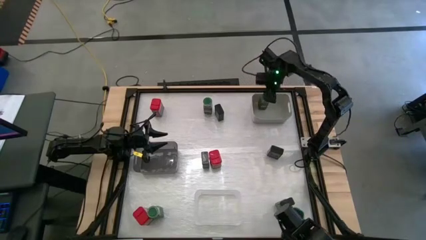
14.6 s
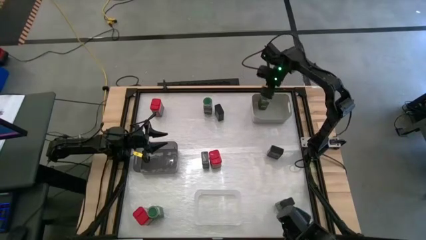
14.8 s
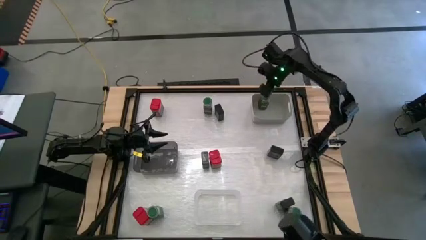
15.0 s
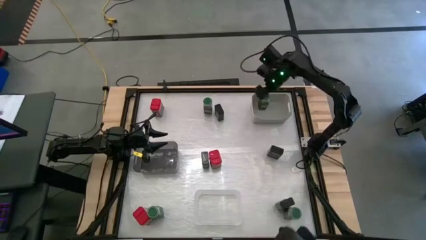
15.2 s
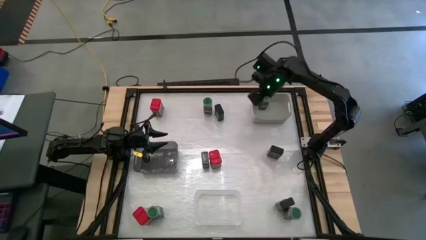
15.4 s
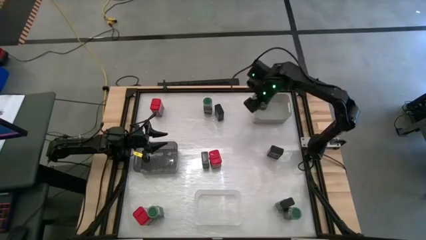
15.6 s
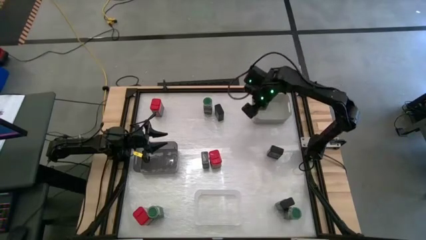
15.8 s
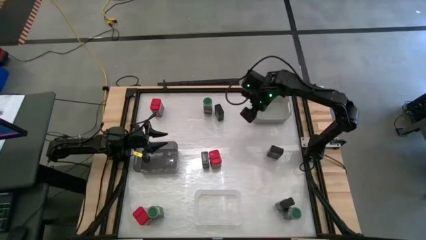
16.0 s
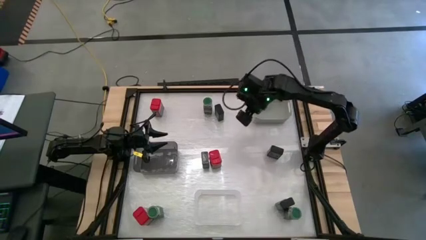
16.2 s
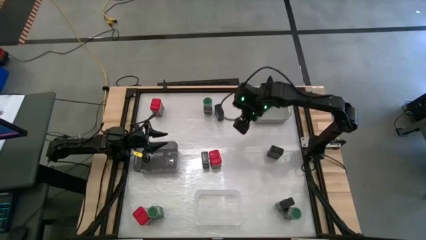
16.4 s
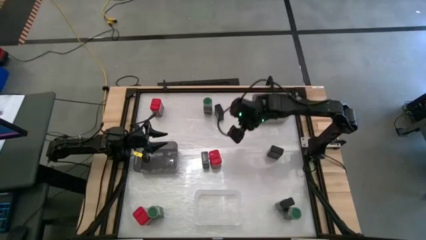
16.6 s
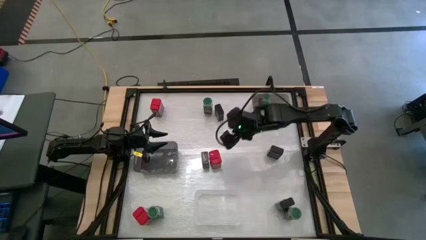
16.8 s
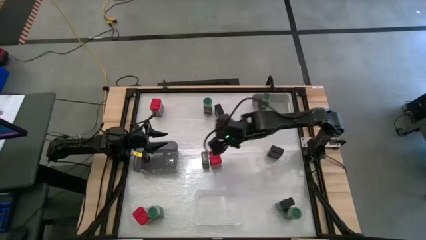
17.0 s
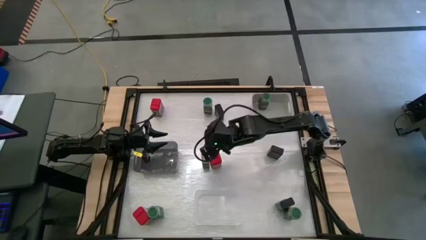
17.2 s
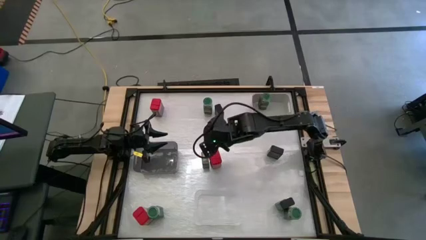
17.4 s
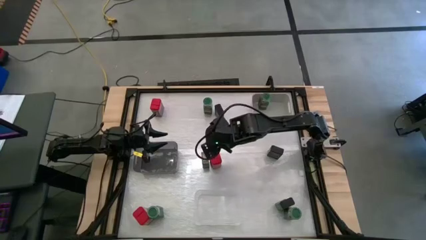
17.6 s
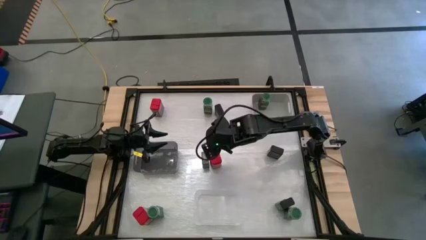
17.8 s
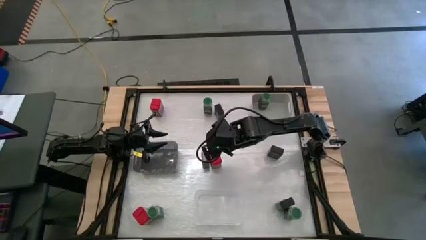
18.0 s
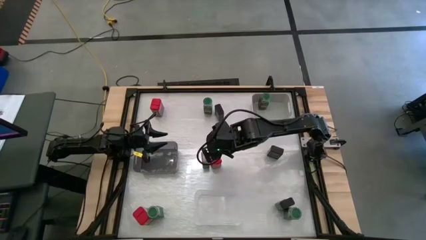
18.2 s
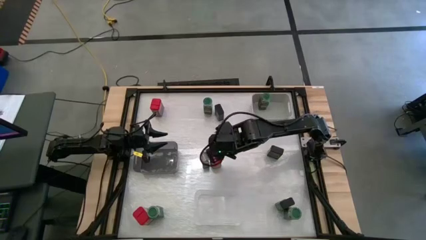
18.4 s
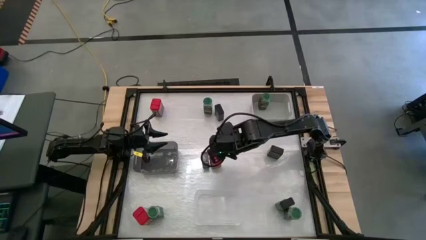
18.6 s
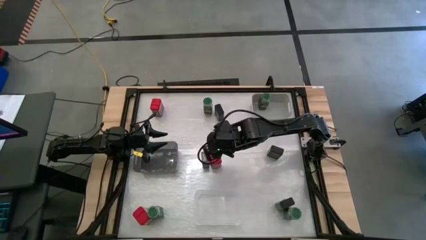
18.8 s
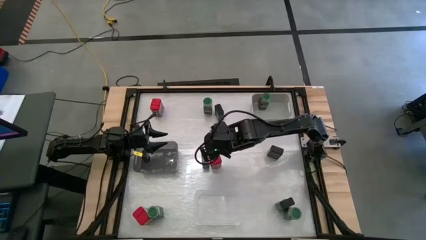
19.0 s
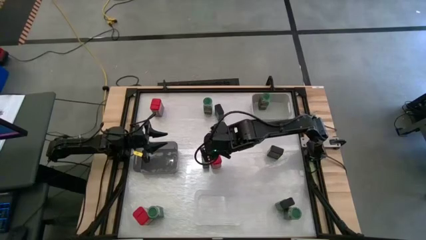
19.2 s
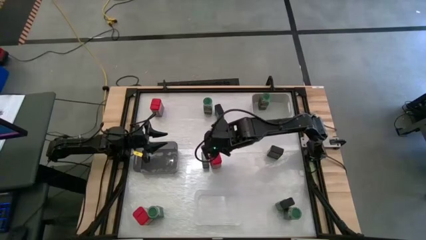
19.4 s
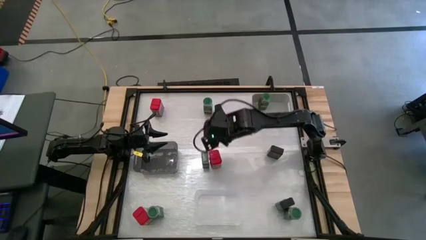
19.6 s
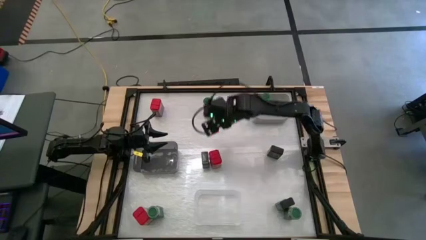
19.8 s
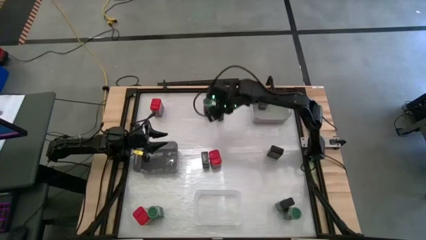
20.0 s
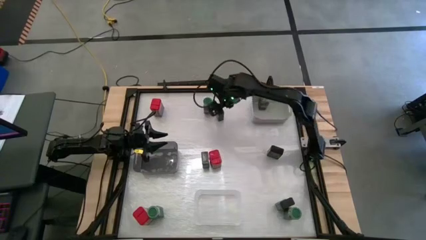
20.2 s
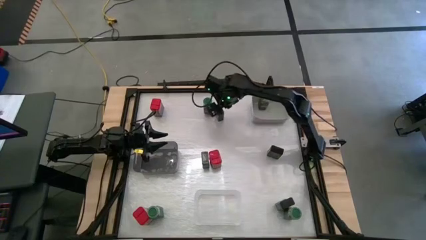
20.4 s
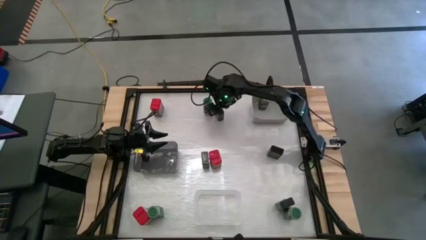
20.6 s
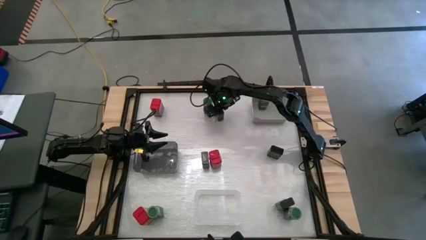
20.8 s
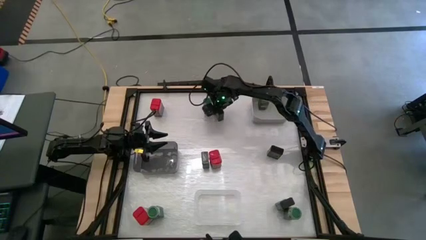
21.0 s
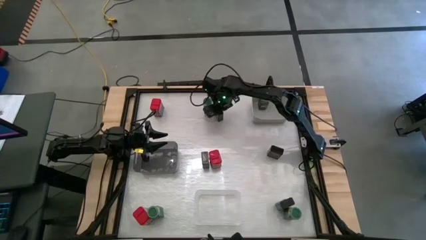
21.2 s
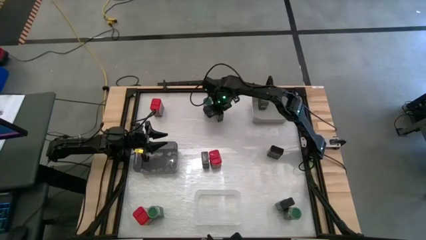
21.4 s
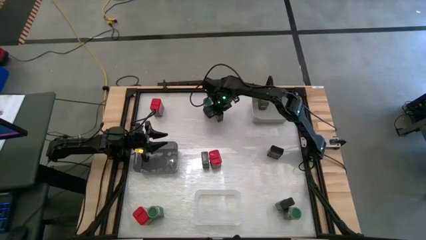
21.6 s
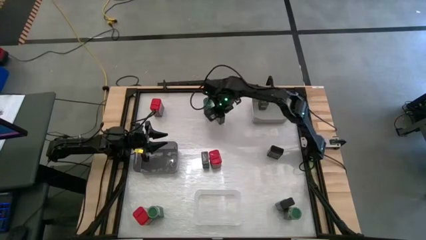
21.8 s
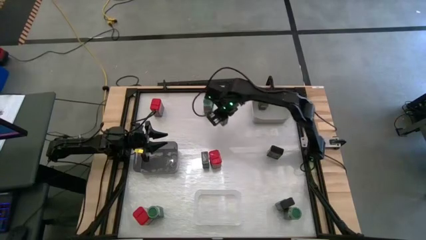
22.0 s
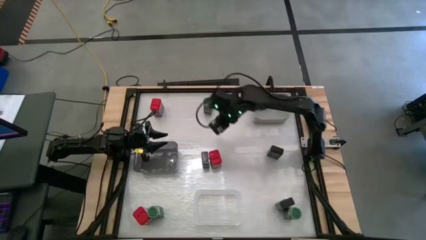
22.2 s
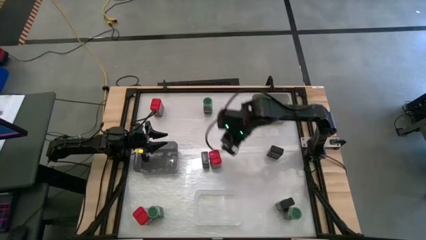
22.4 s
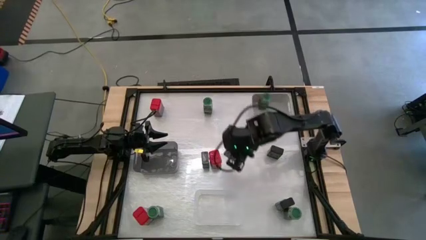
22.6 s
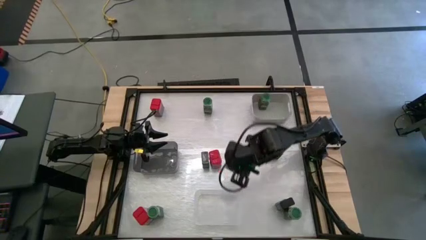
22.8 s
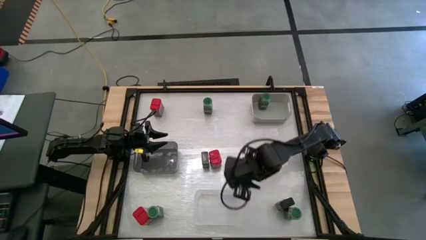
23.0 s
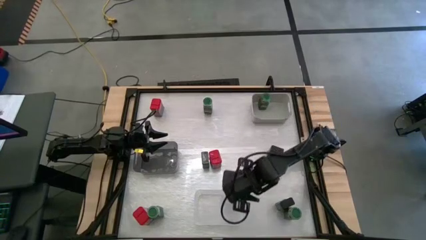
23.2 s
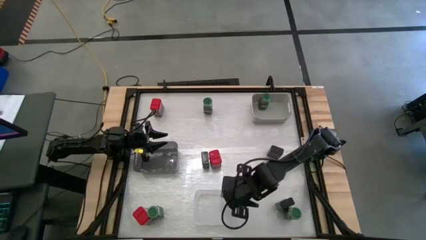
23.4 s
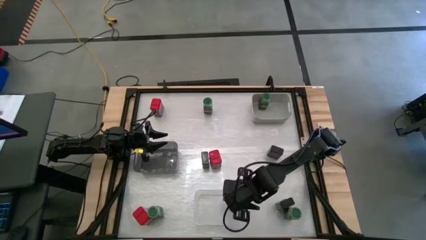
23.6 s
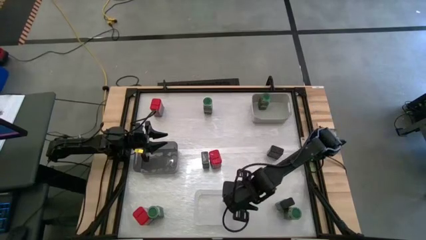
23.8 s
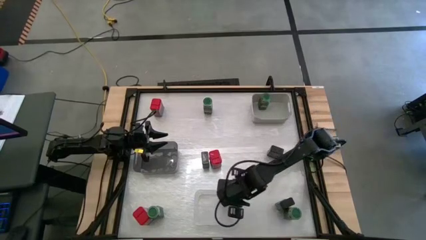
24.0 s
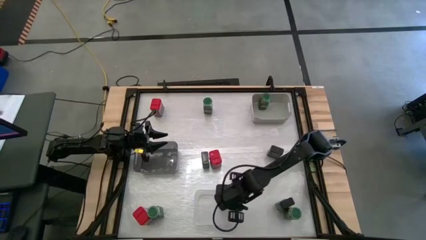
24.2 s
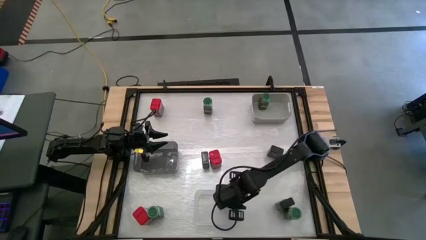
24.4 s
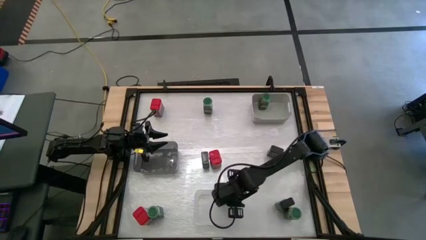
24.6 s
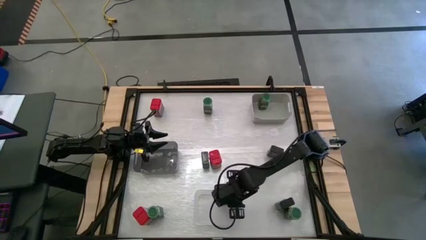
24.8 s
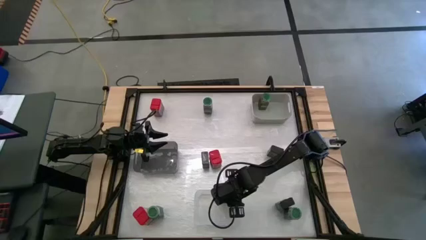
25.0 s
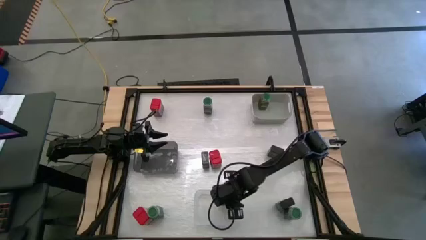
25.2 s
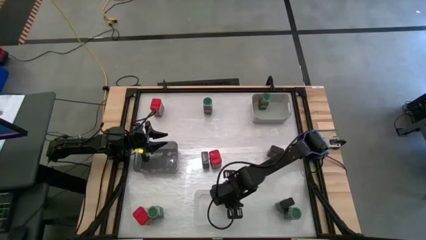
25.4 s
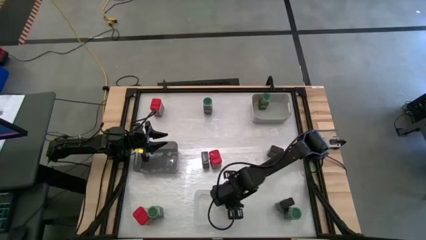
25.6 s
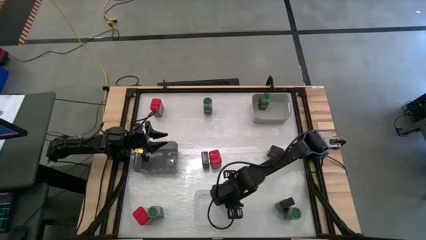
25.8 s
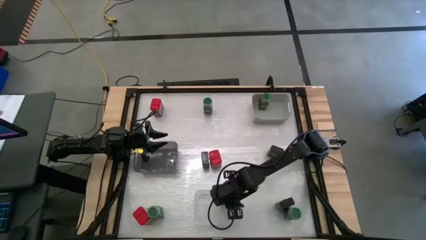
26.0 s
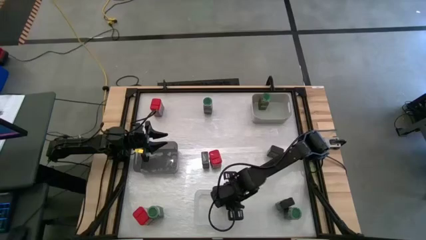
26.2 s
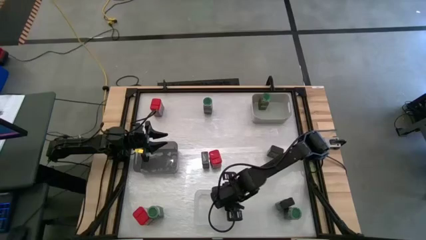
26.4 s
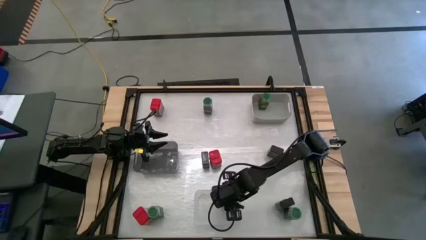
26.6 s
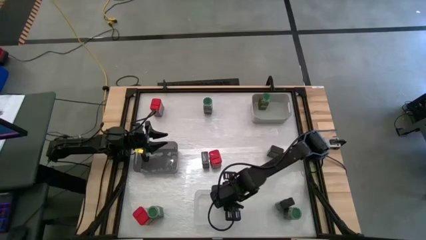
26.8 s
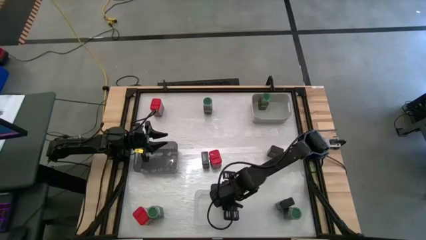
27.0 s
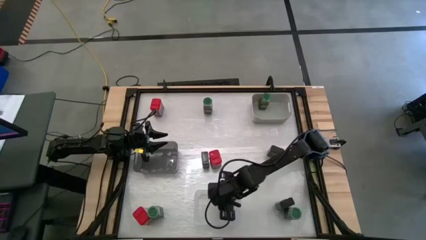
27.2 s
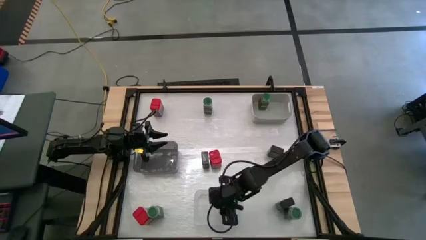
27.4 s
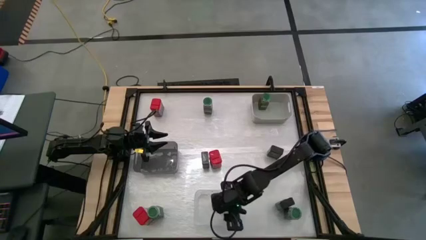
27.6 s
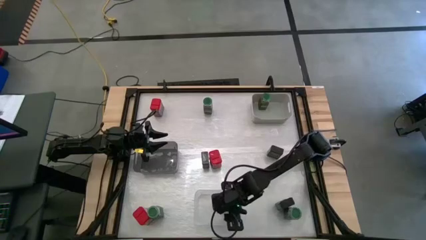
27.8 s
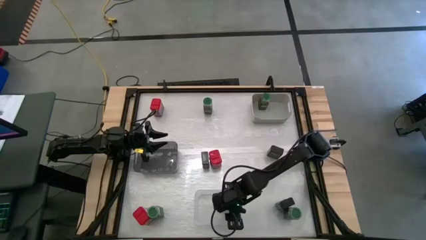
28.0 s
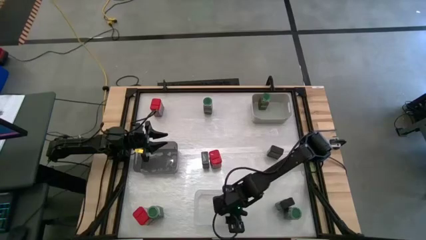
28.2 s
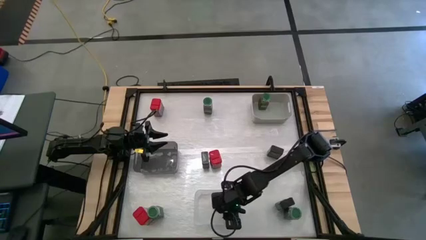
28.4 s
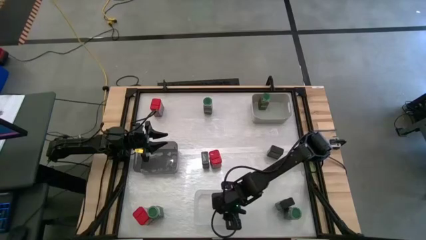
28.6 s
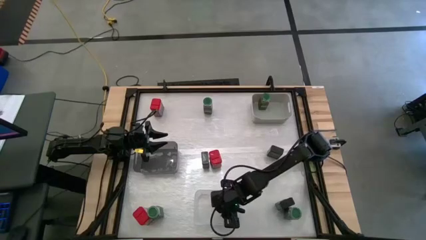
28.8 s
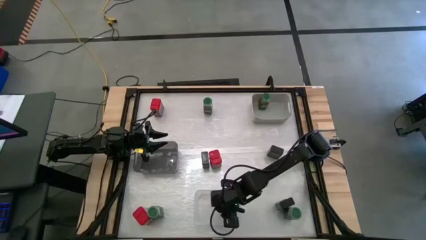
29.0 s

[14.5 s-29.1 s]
Task: Sort spices by type
Put the top left black seasoning can into the transparent bin

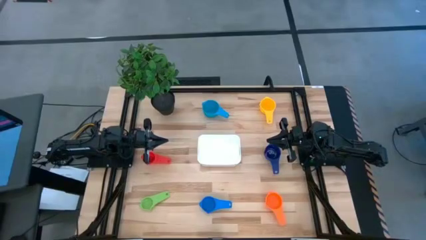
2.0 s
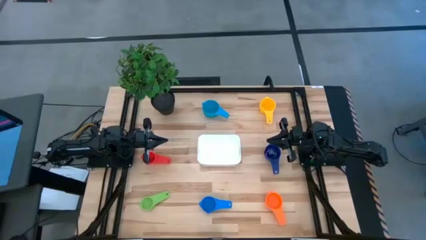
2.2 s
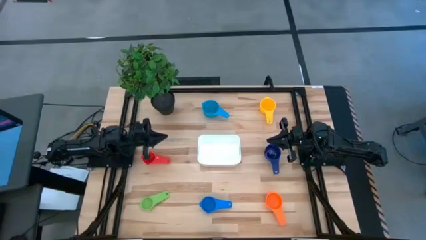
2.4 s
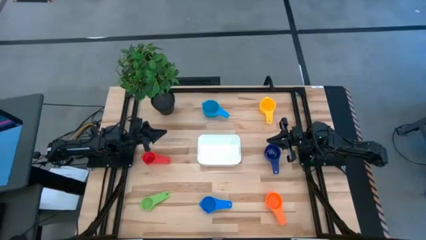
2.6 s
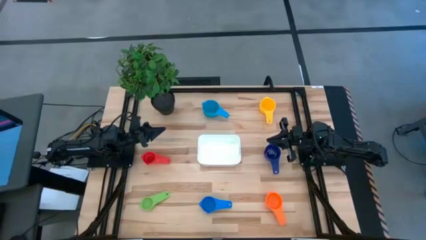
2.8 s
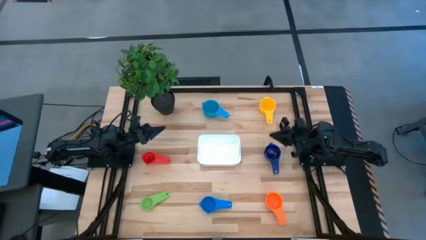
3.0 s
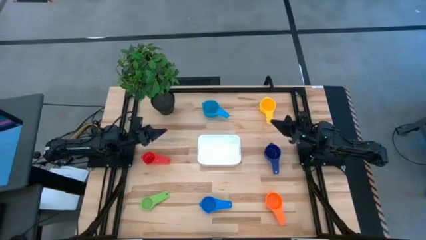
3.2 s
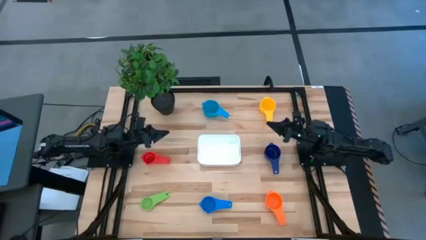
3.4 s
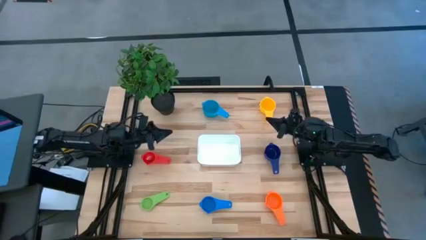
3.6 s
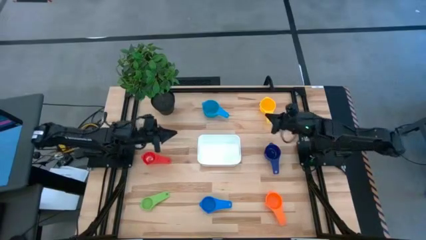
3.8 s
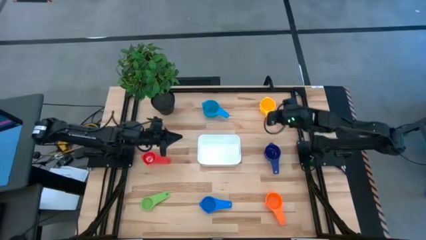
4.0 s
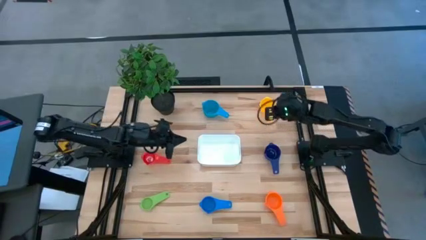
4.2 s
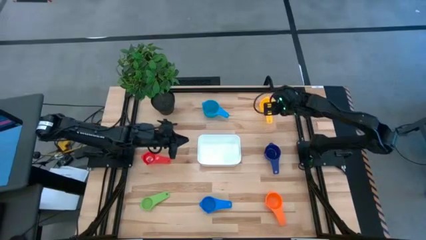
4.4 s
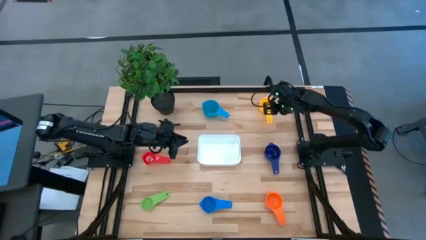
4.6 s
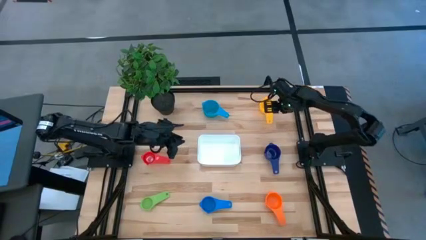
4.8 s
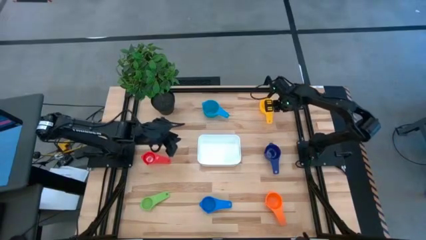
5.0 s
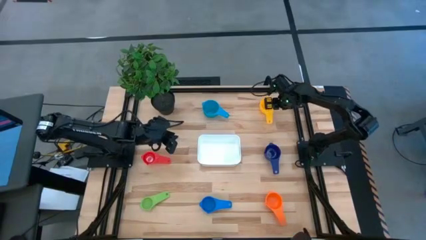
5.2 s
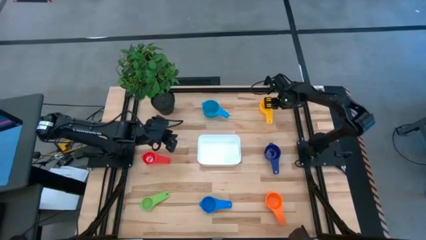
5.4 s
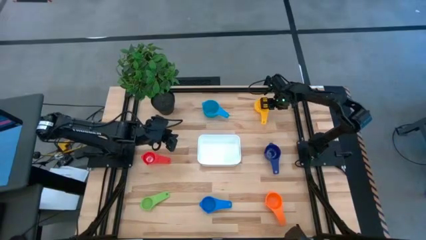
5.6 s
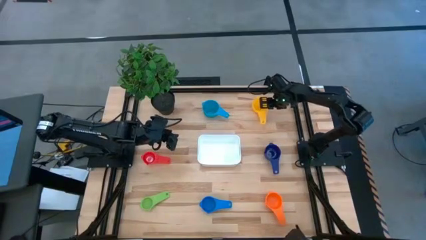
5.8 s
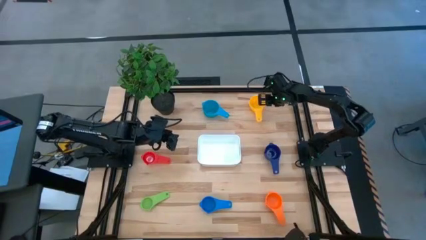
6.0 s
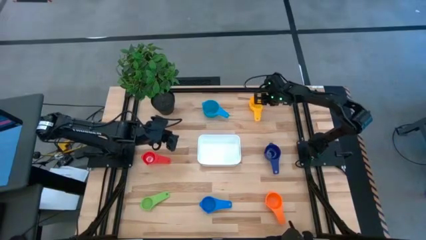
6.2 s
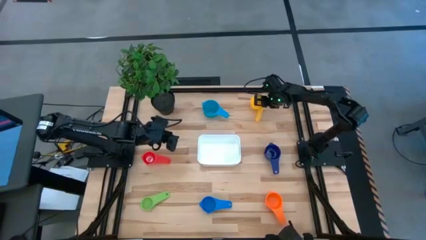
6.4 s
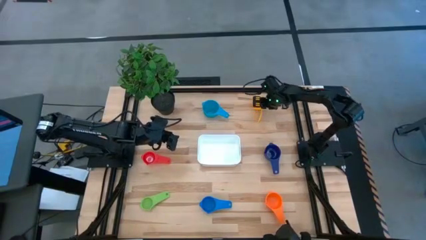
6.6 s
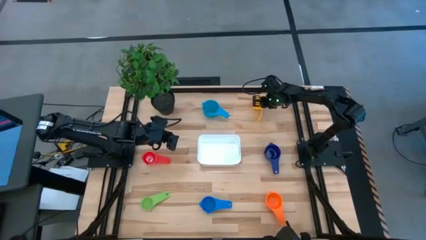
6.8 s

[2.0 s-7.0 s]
Task: Nest measuring cups in basket
Stack the yellow measuring cup on top of the light blue measuring cup
